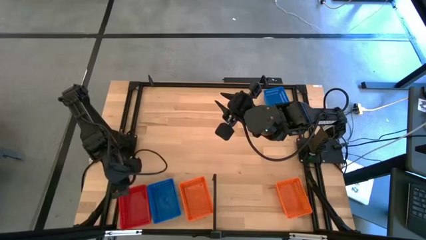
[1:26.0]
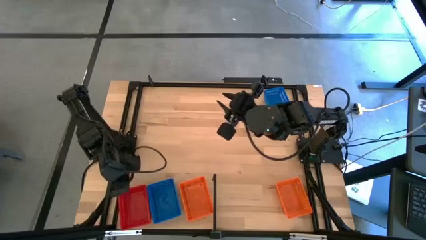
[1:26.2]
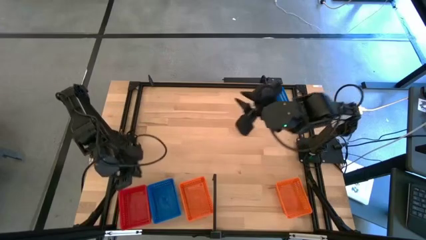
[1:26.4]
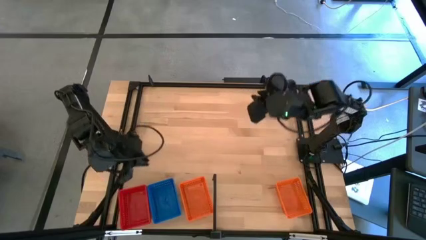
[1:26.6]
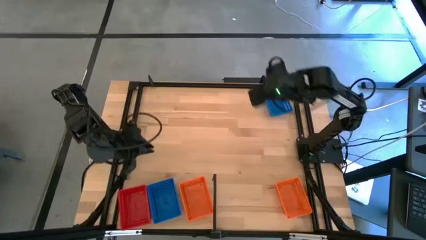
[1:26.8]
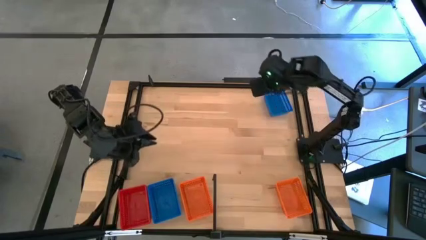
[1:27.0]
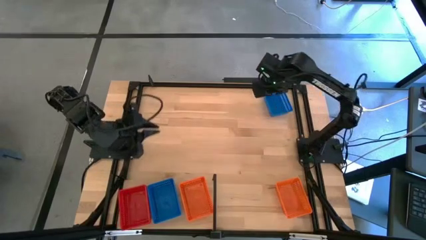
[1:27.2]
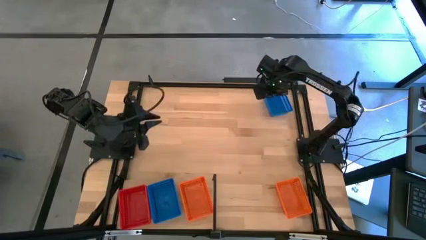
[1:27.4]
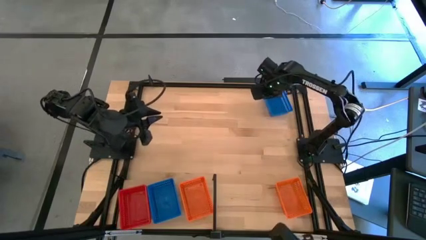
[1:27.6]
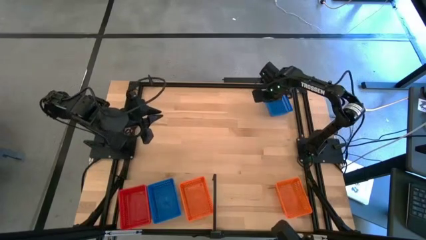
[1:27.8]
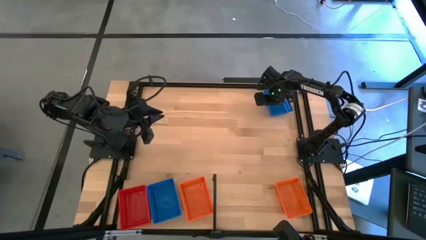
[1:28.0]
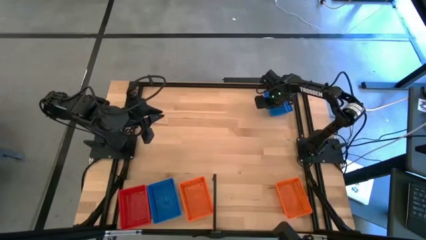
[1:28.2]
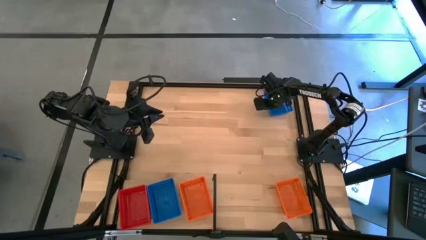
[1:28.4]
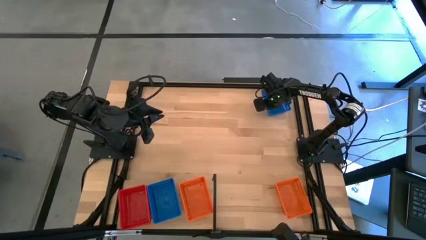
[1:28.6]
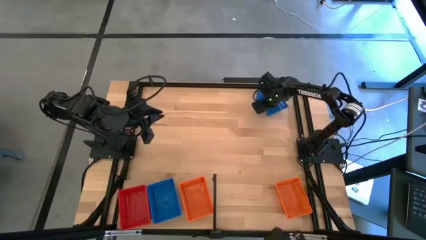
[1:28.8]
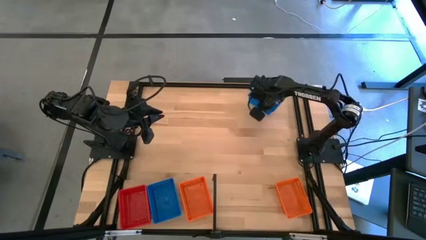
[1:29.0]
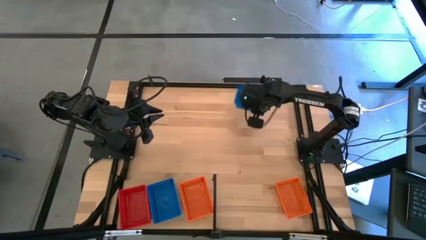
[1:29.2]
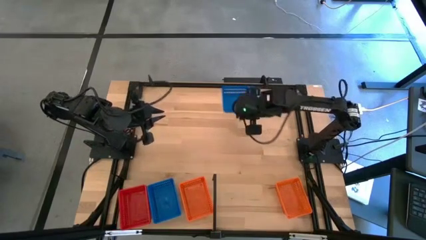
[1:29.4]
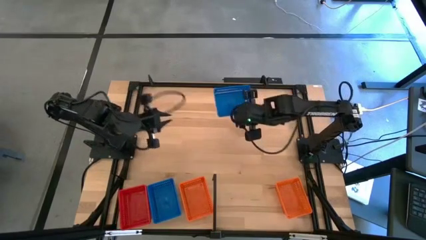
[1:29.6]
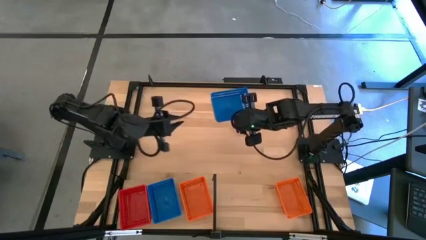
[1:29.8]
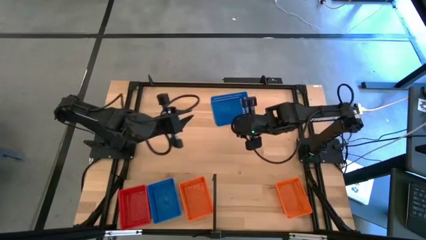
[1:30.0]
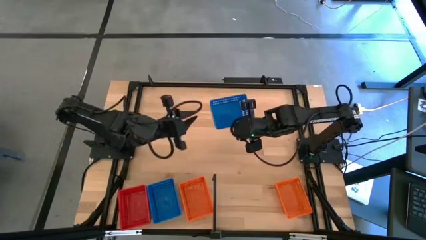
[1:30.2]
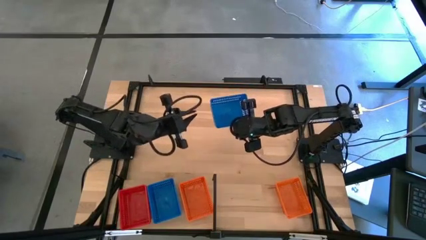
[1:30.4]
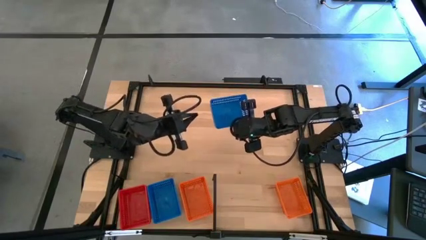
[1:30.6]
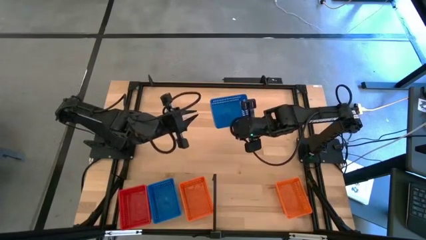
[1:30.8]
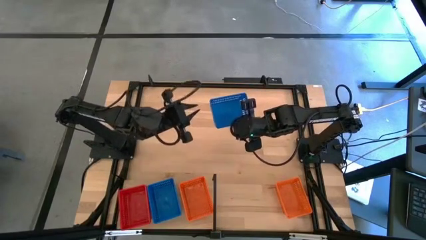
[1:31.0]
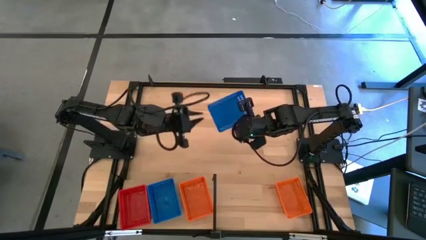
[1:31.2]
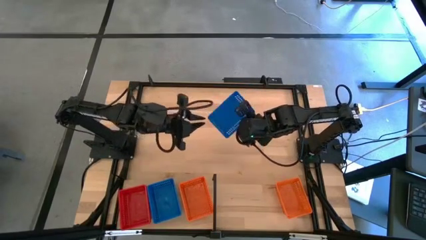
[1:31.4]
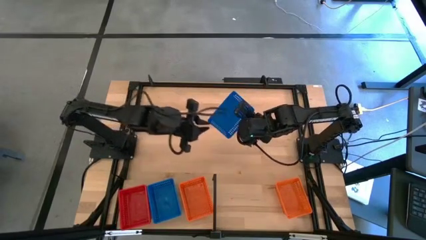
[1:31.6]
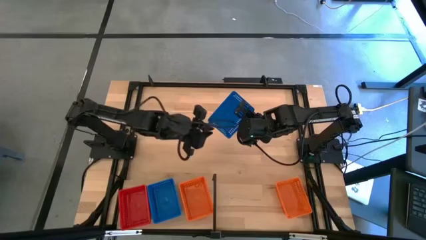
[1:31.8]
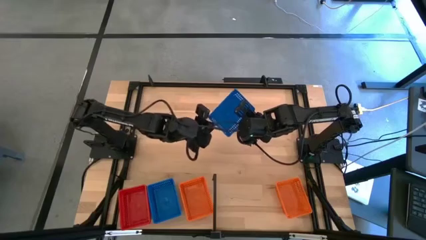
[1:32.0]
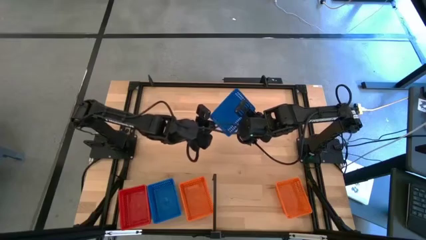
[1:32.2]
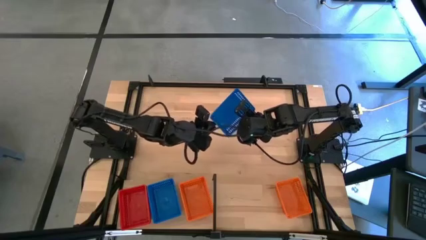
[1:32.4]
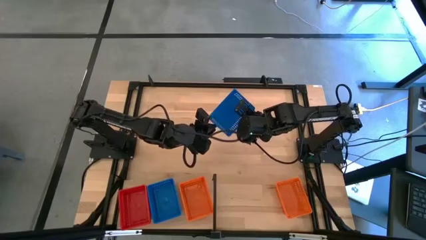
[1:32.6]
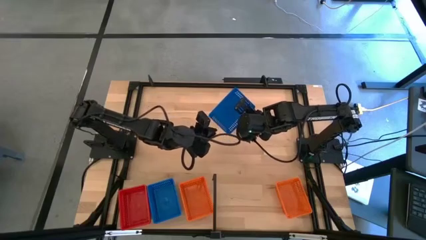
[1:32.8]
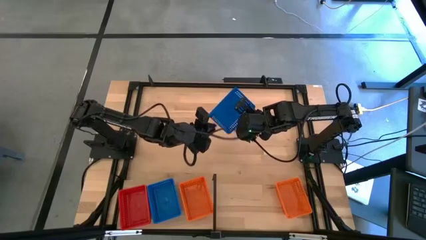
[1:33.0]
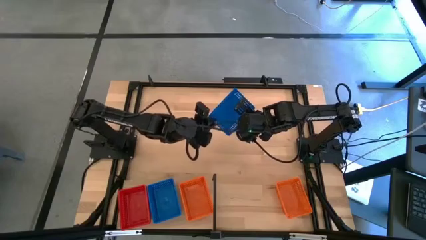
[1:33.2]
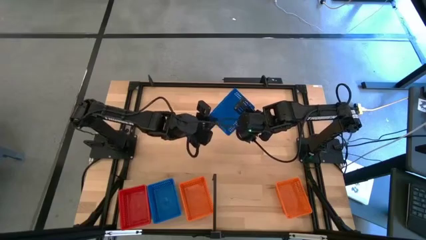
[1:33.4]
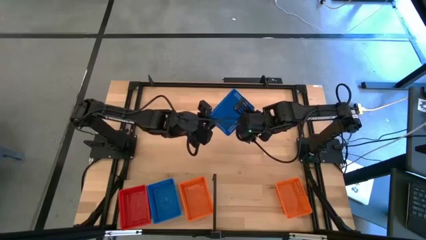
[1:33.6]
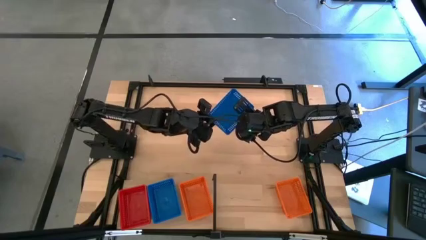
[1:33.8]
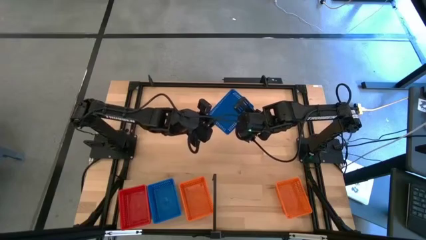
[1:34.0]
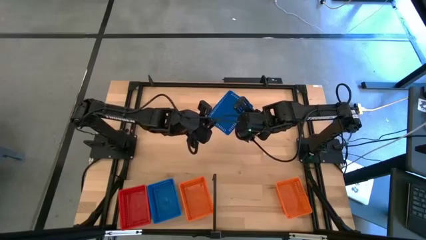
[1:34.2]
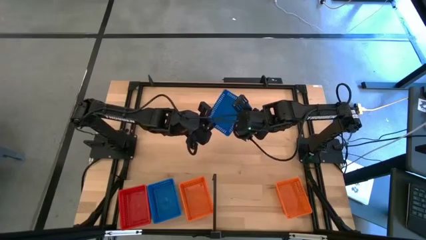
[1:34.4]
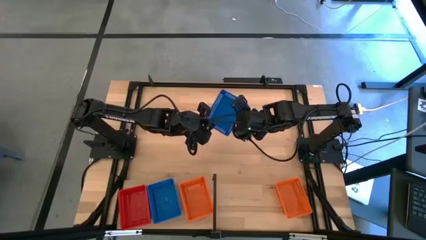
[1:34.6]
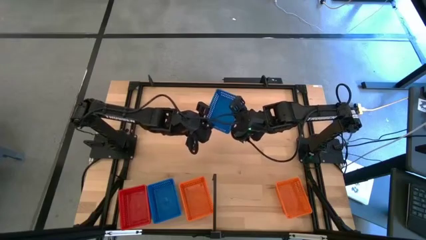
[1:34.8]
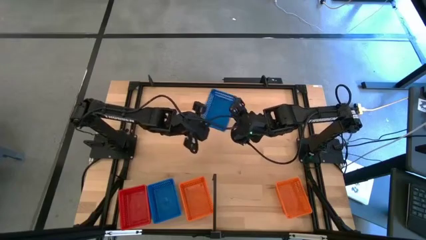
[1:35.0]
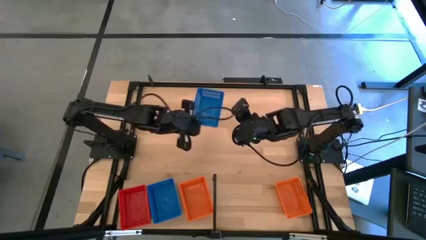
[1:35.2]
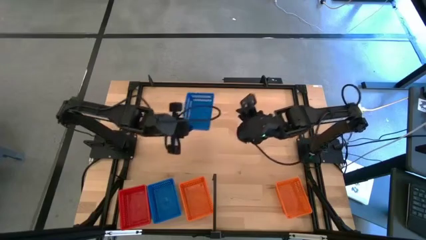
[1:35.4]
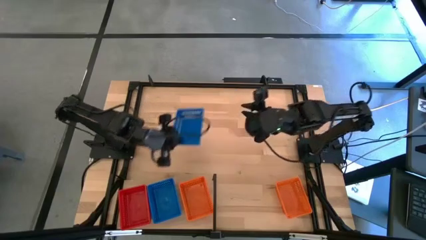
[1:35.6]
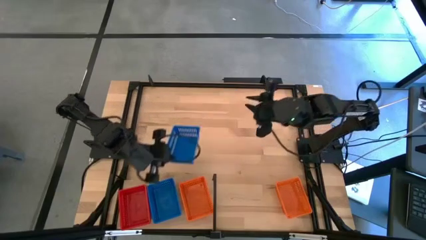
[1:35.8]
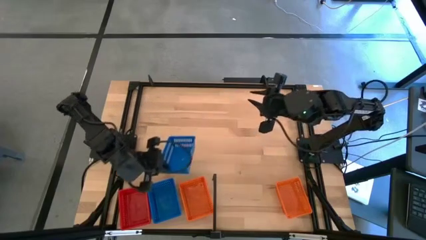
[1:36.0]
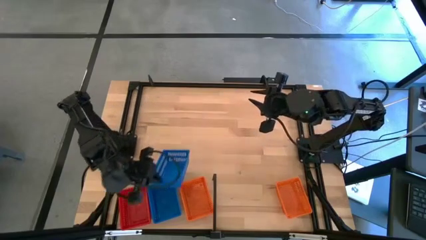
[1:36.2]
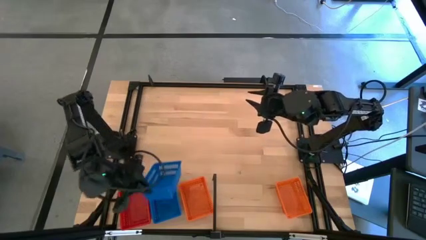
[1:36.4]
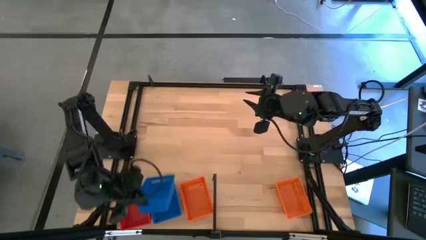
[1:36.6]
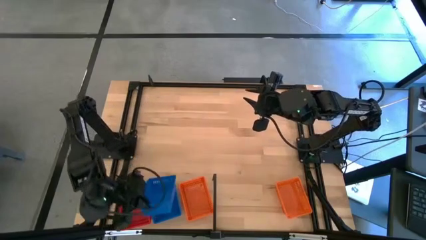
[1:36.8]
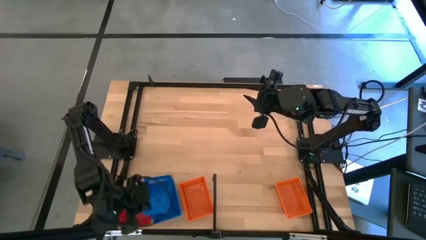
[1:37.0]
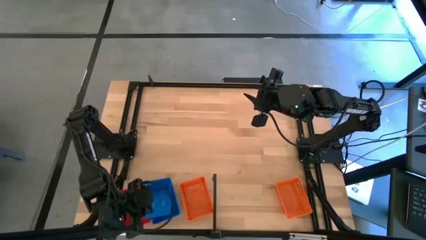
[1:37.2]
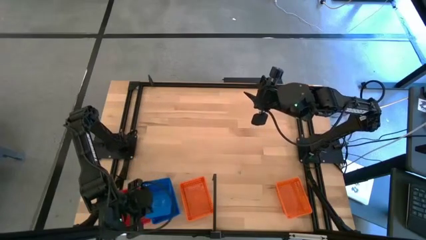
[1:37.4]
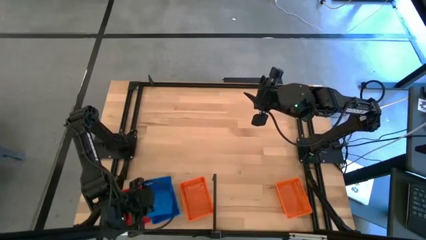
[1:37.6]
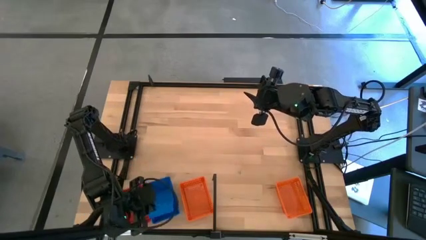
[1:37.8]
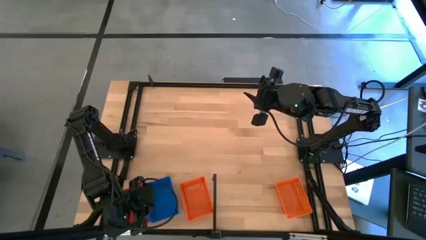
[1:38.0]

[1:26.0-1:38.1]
Task: Stack baskets on shelf by color
Stack the blue bin on top of the blue bin on the shelf

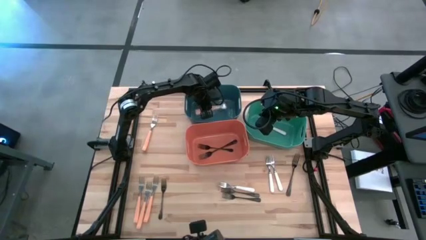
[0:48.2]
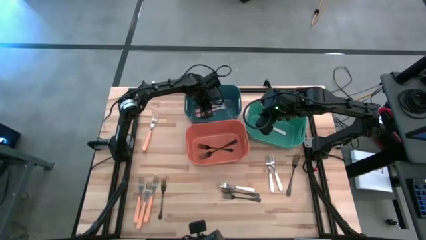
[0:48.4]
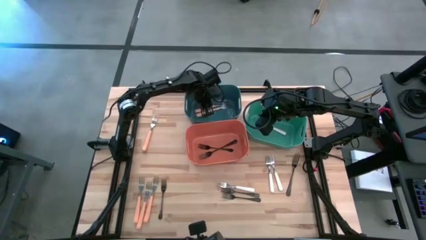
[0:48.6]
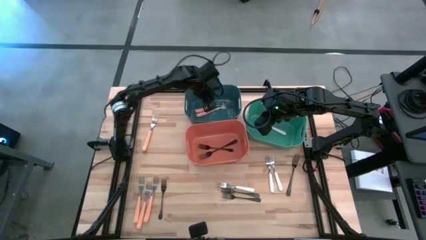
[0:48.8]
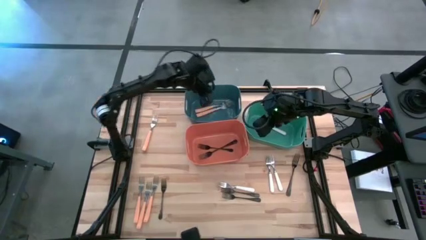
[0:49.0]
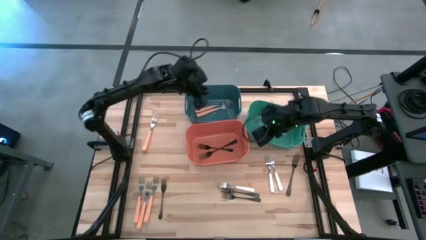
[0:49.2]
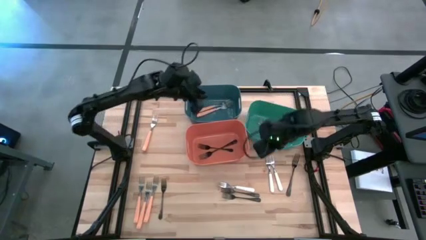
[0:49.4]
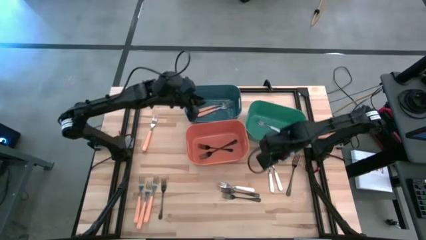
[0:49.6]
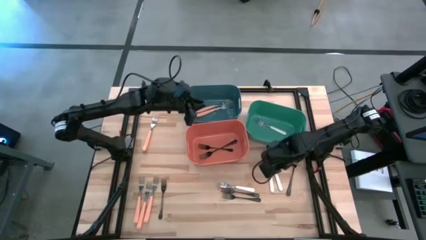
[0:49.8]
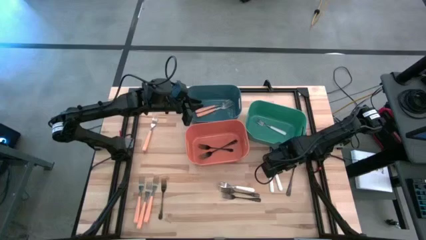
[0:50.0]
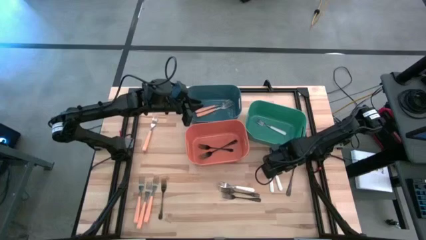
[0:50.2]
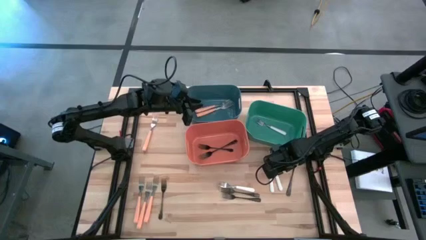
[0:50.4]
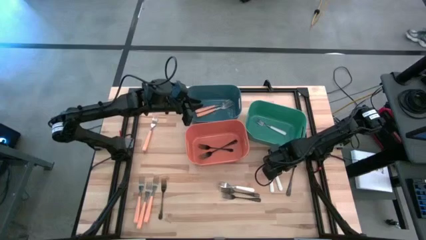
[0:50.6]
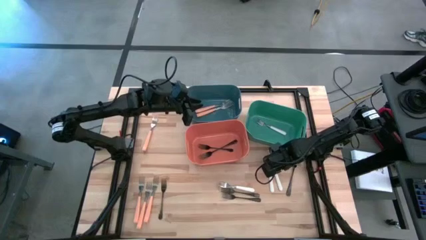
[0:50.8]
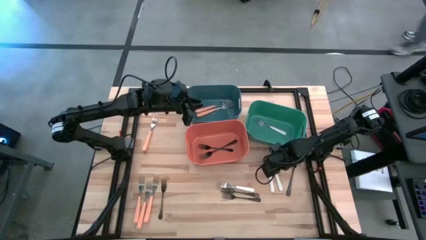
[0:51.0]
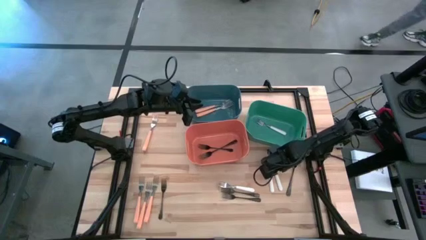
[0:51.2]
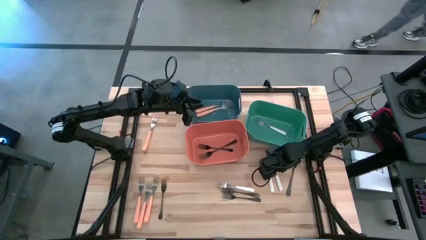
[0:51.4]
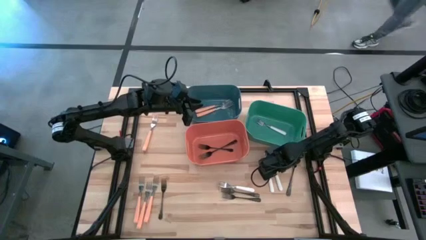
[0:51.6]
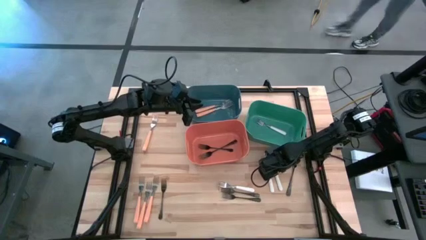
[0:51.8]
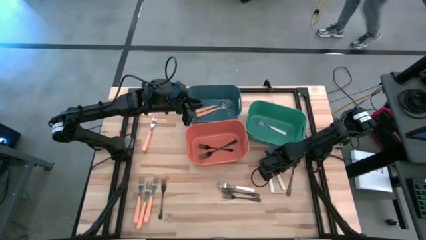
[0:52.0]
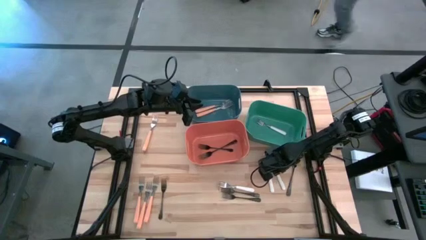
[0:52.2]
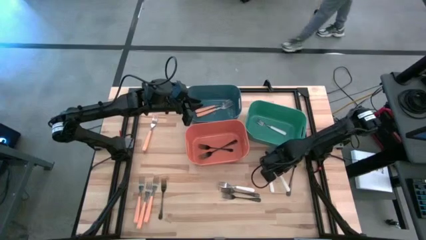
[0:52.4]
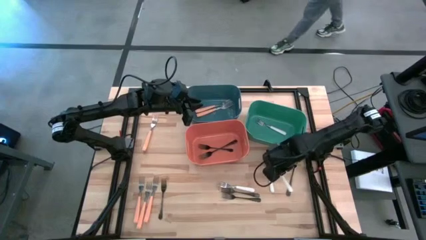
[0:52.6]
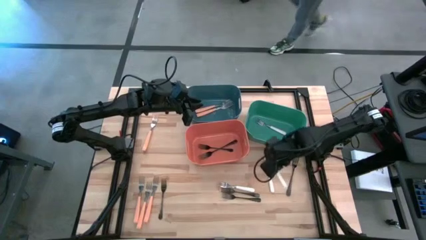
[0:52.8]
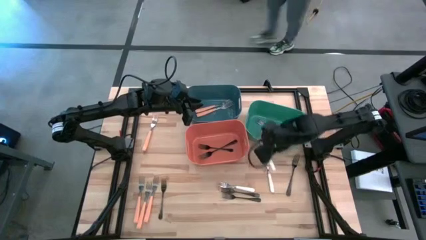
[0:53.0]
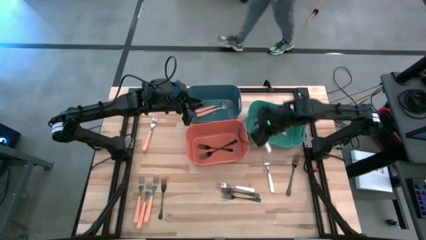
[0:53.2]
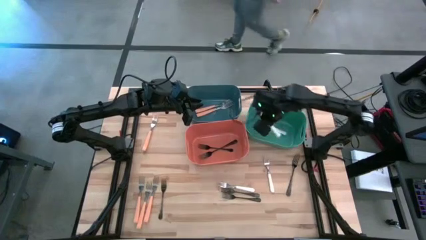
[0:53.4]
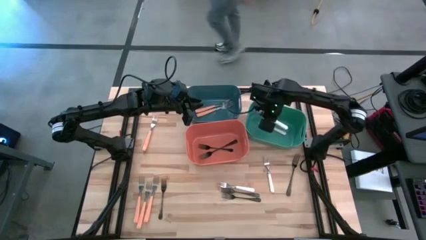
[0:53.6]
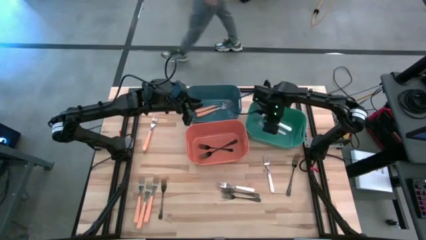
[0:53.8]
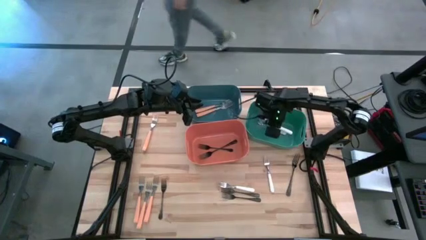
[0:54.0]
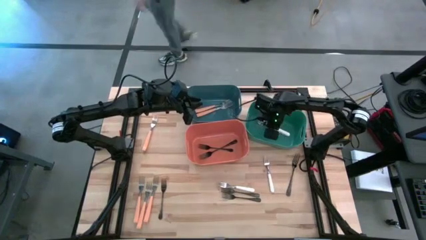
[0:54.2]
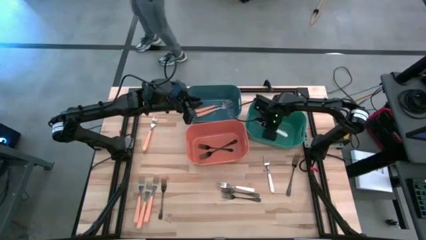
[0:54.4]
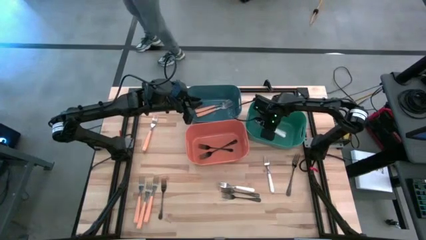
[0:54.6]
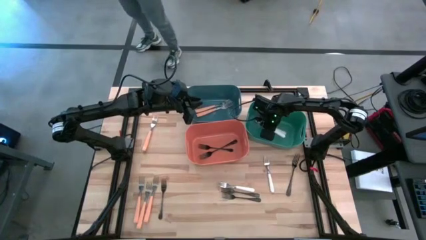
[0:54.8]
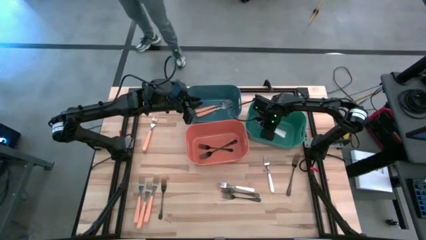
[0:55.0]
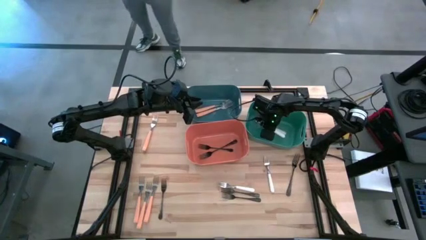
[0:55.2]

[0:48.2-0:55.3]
Task: Sort silverware by color (type)
Put the white fork into the green bin
